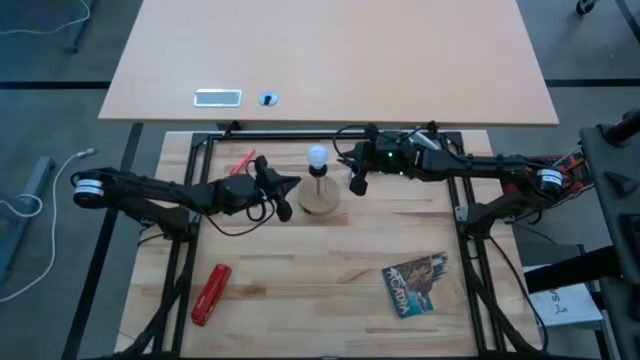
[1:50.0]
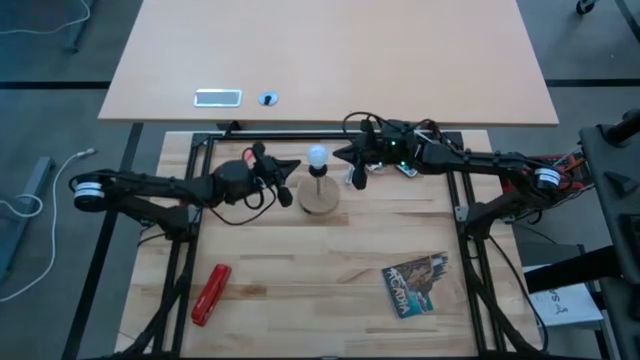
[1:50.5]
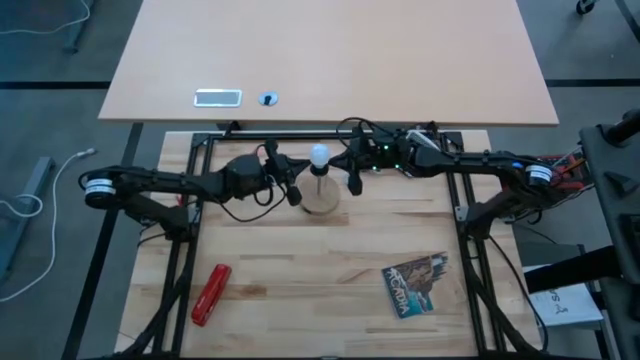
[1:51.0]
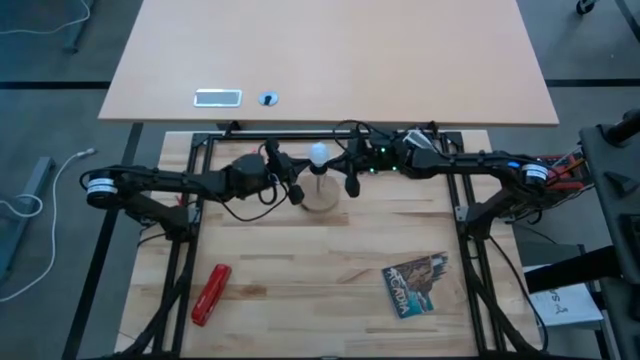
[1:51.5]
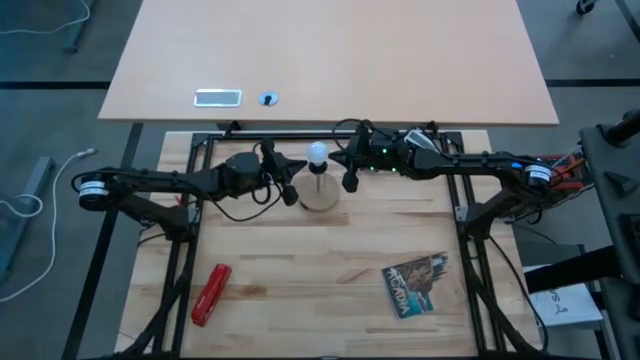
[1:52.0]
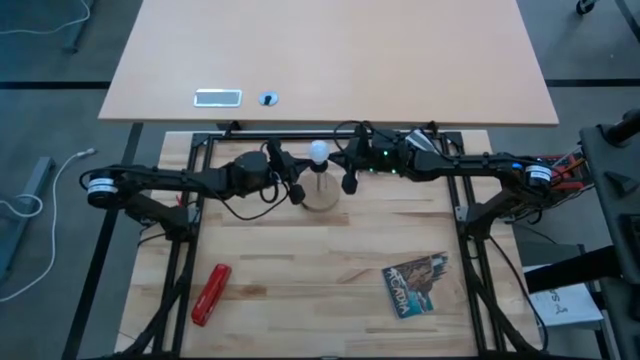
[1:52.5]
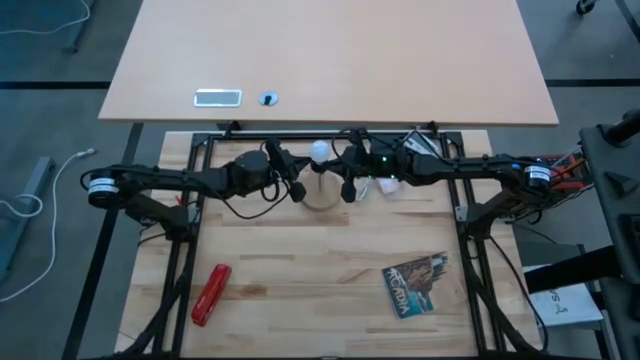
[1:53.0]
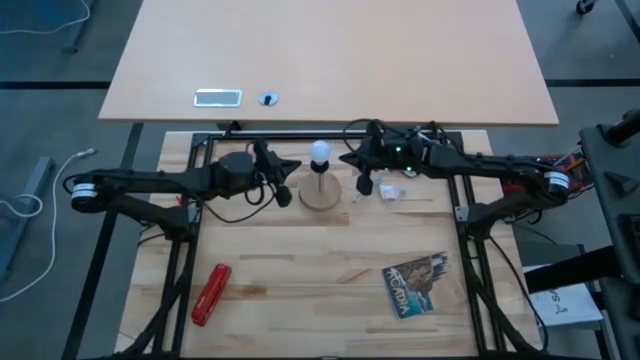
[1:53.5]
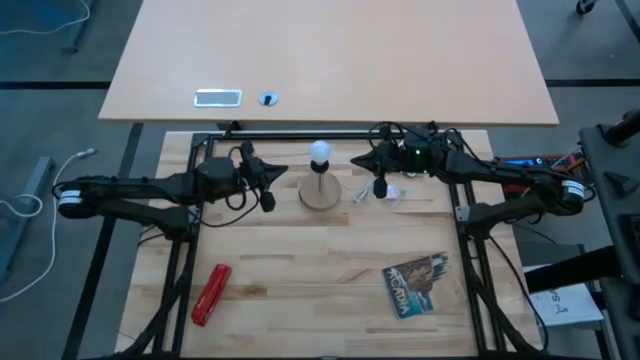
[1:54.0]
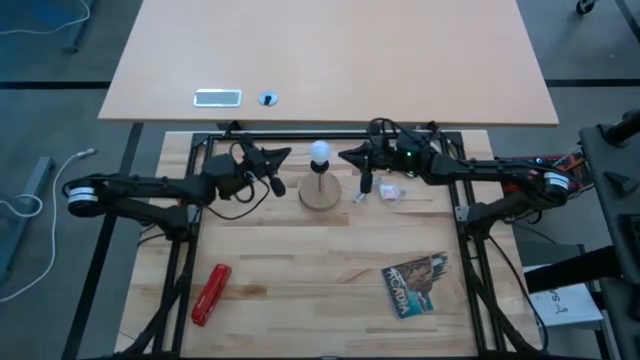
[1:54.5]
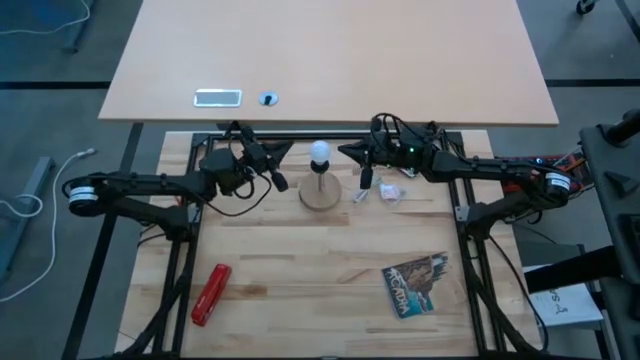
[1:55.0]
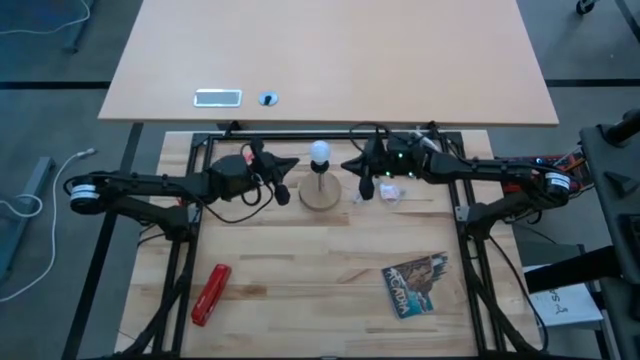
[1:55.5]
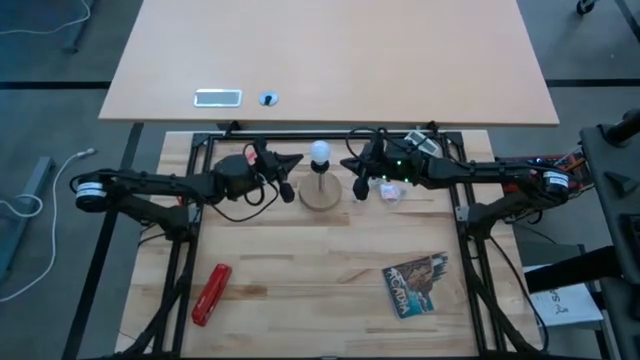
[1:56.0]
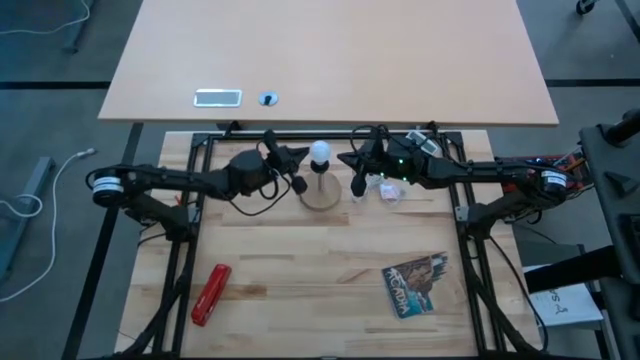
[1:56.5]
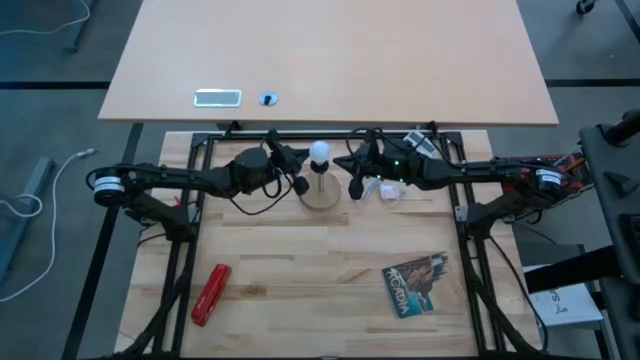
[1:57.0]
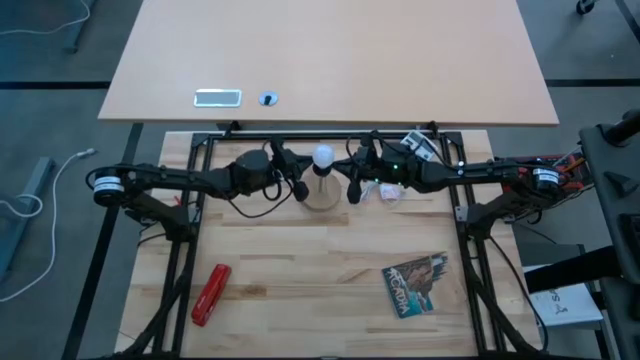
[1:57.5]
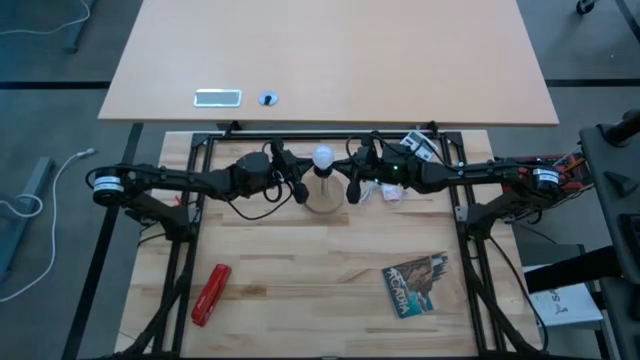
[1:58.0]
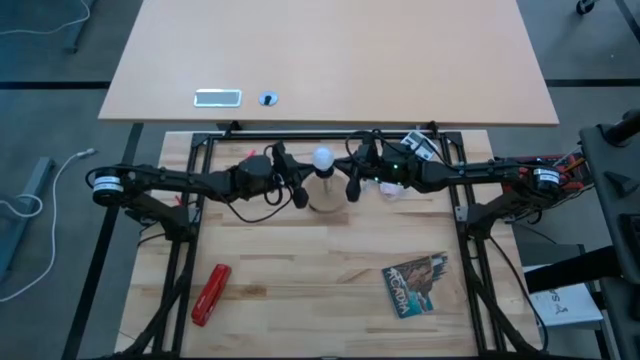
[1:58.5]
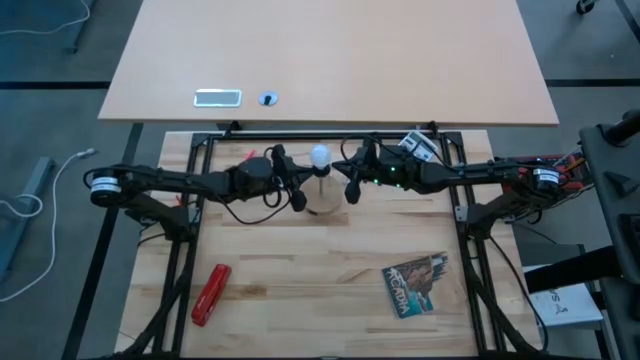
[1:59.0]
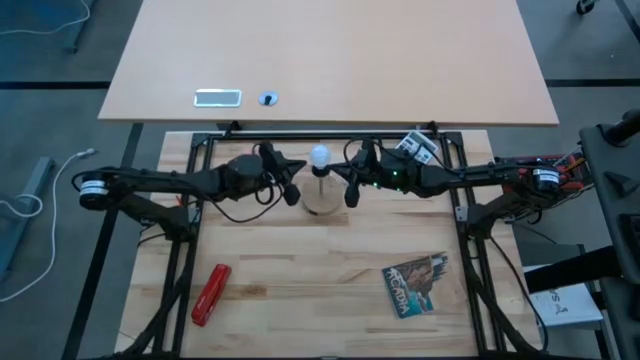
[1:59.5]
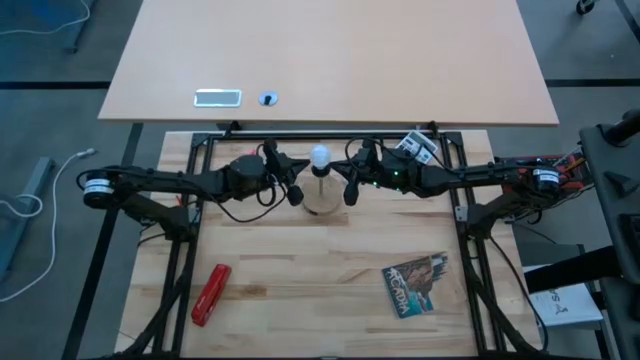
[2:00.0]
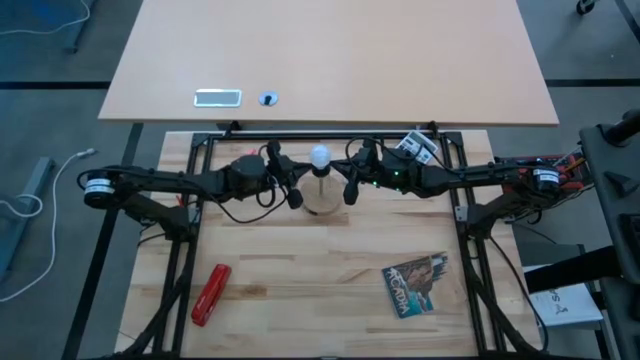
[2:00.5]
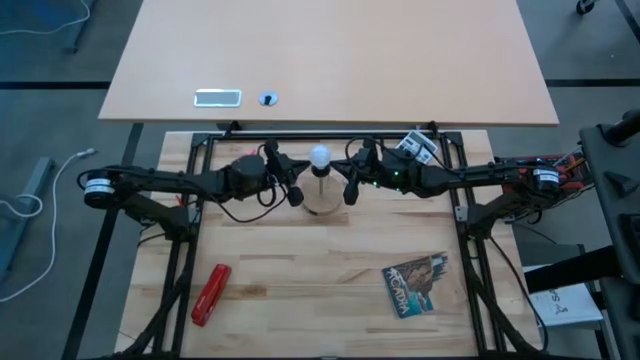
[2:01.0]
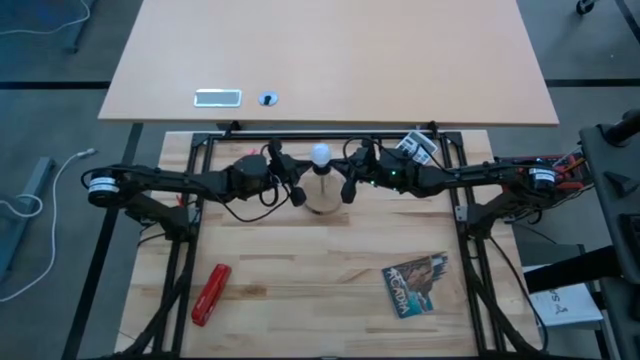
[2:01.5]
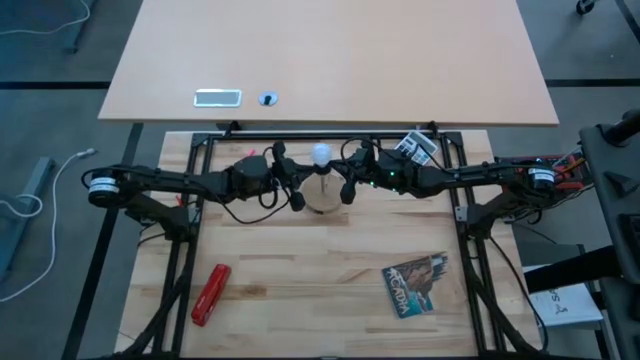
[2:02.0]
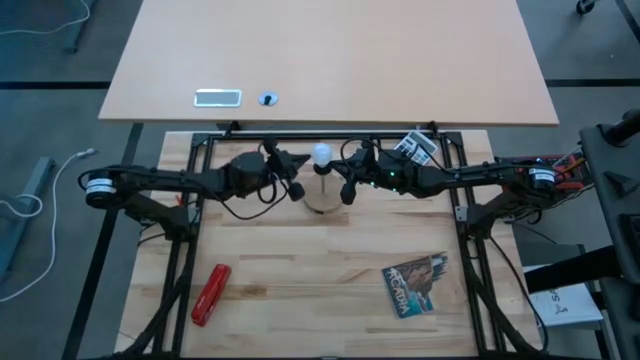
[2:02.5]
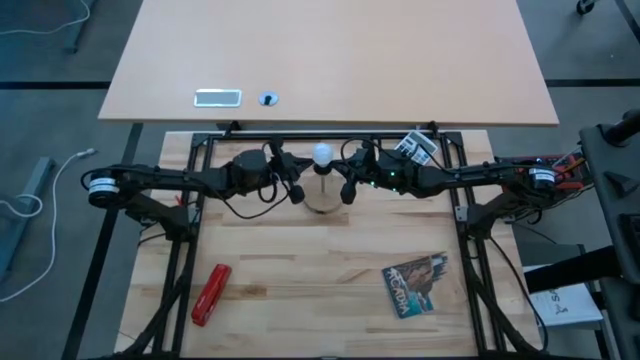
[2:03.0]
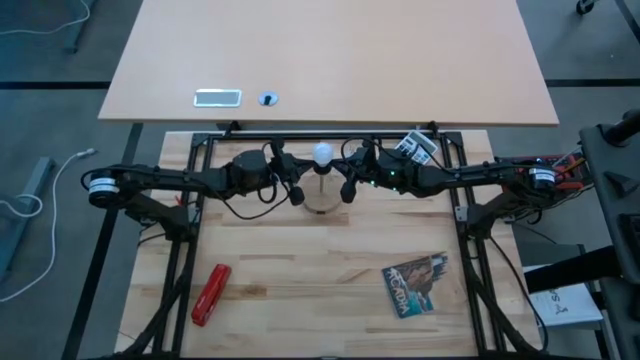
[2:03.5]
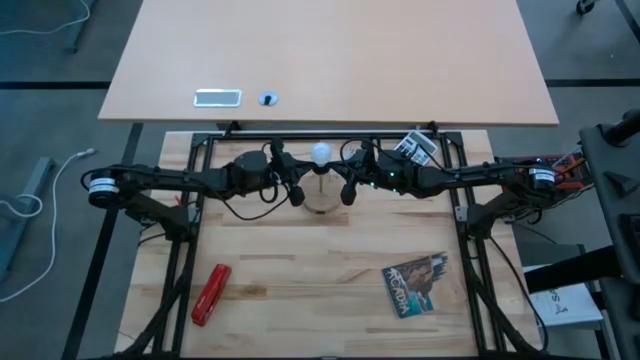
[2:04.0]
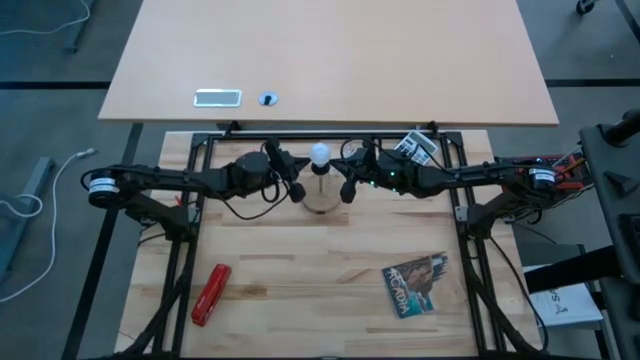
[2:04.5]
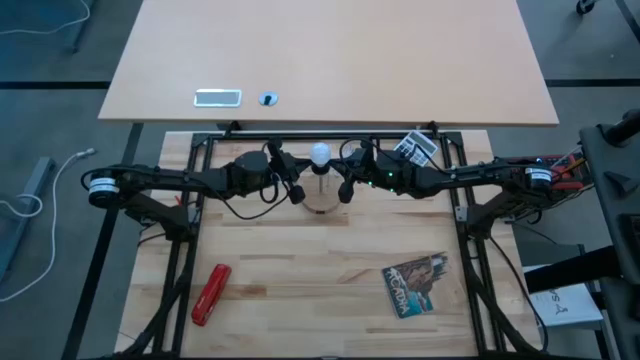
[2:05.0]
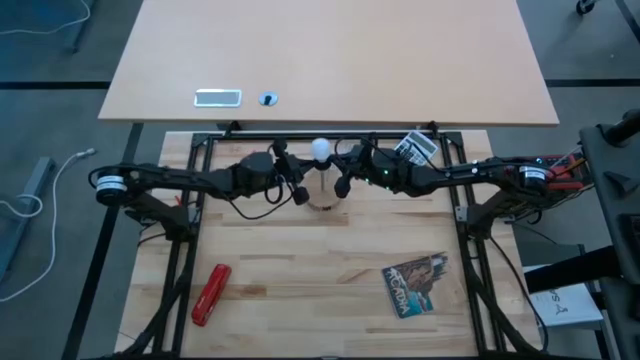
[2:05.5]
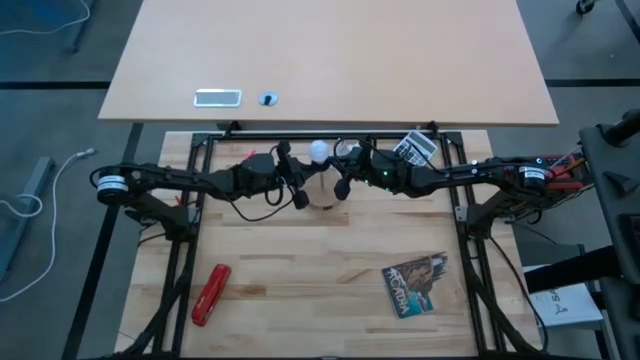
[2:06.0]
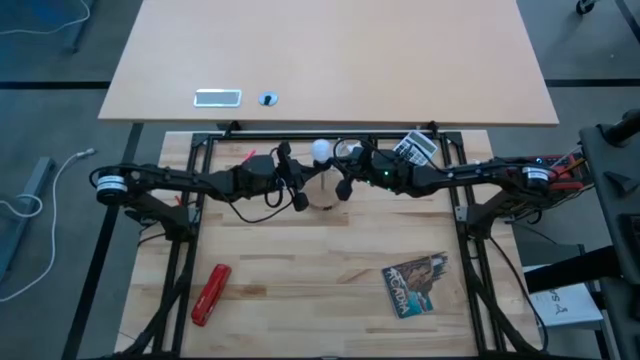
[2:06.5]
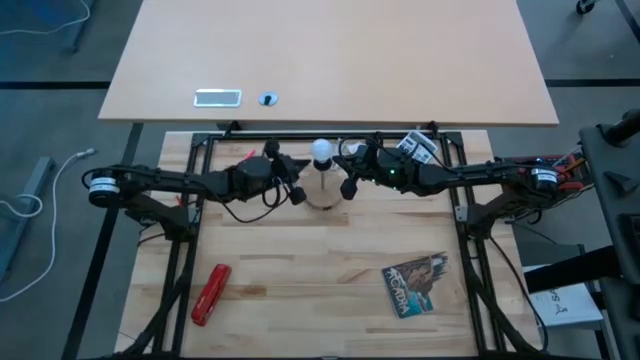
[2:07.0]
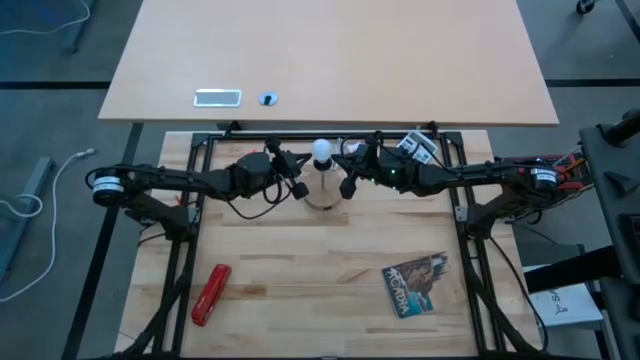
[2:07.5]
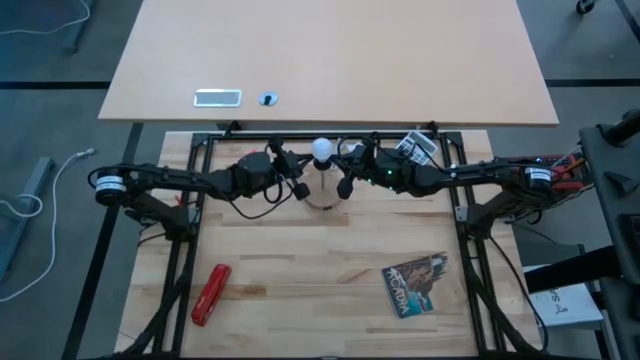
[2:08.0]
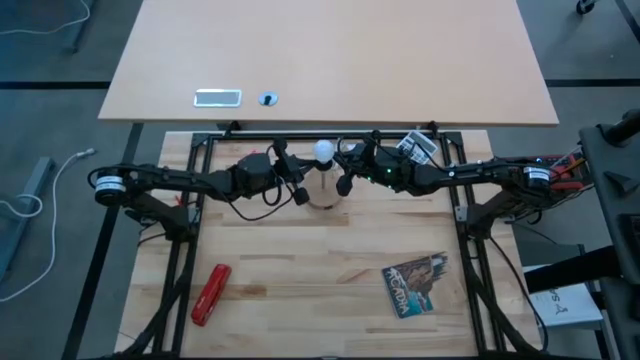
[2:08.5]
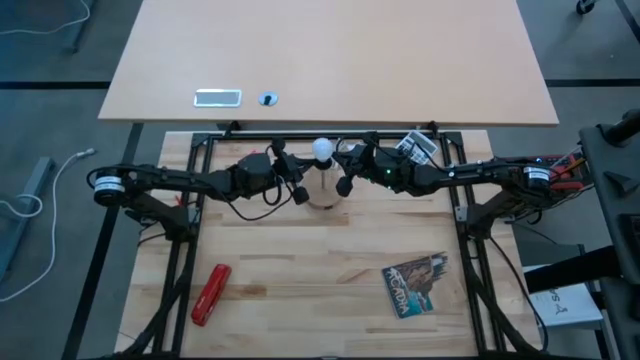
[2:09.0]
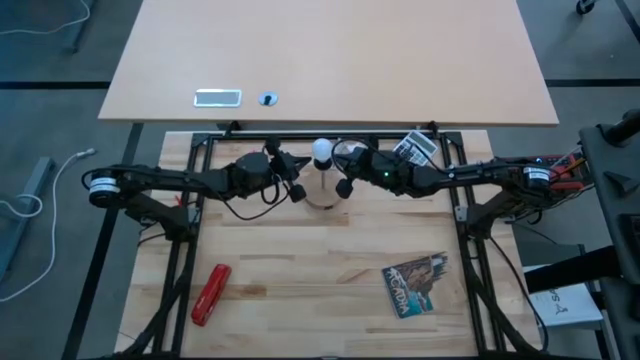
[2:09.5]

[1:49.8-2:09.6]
Task: Screw lightbulb
Remove the lightbulb from the lamp
